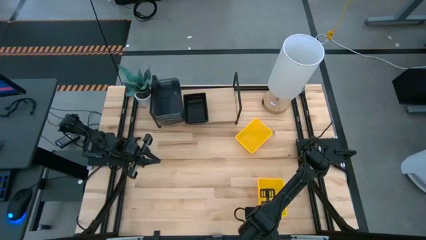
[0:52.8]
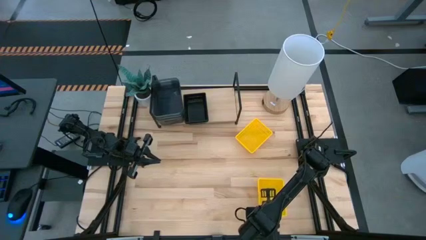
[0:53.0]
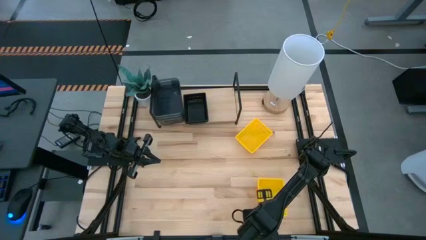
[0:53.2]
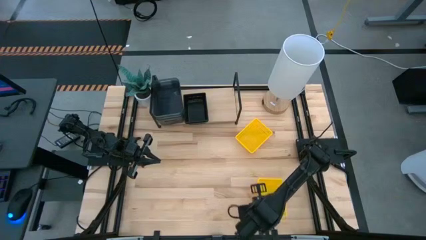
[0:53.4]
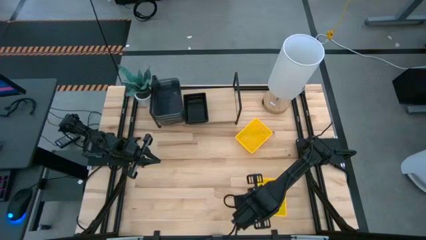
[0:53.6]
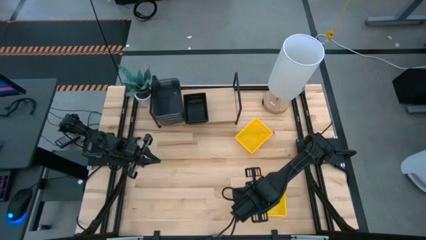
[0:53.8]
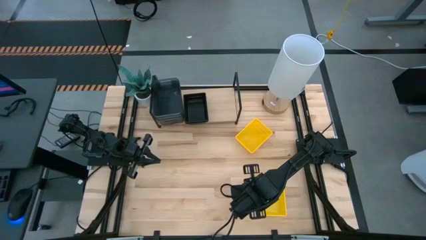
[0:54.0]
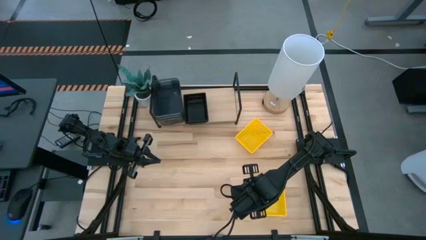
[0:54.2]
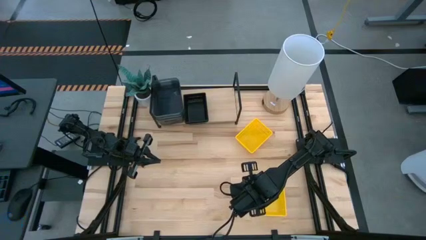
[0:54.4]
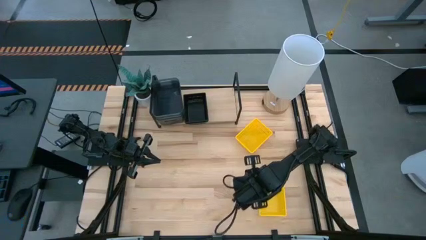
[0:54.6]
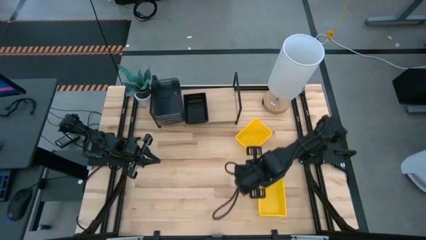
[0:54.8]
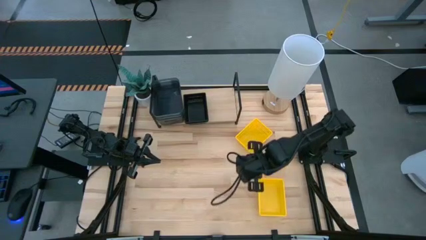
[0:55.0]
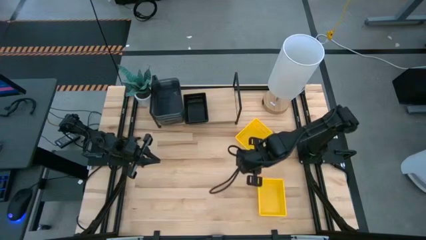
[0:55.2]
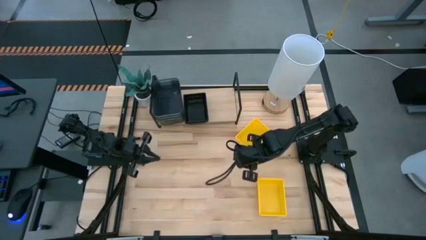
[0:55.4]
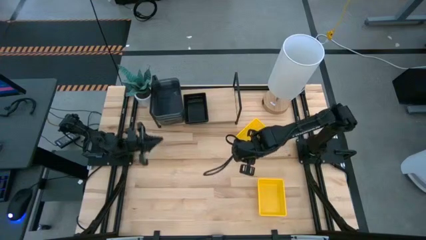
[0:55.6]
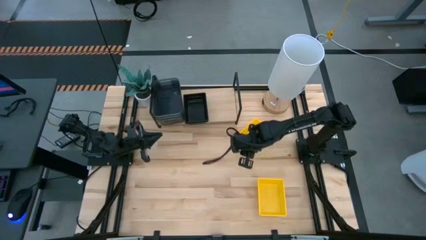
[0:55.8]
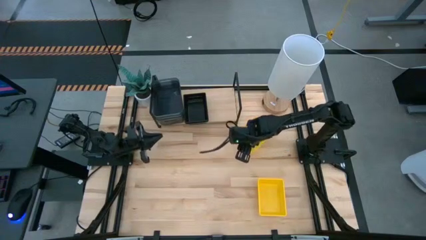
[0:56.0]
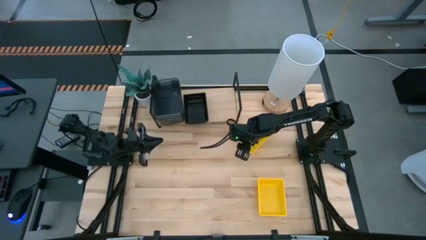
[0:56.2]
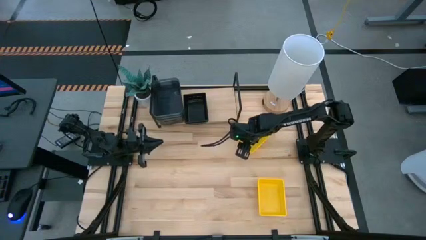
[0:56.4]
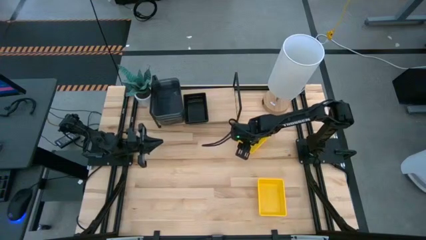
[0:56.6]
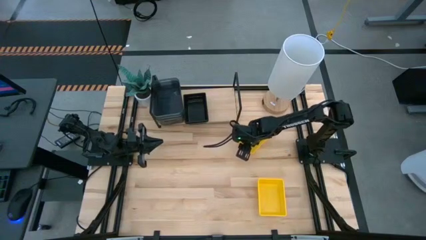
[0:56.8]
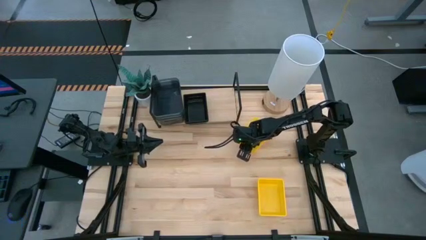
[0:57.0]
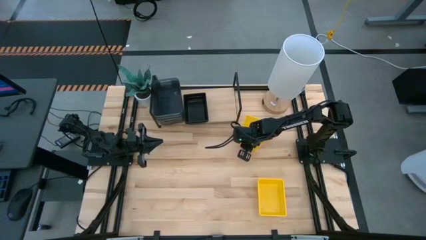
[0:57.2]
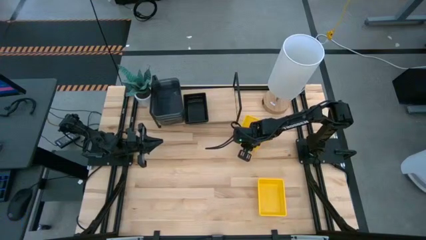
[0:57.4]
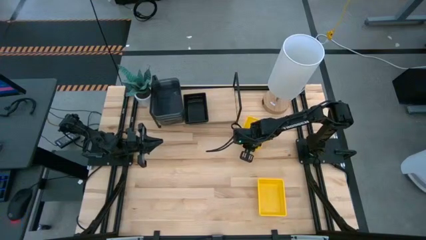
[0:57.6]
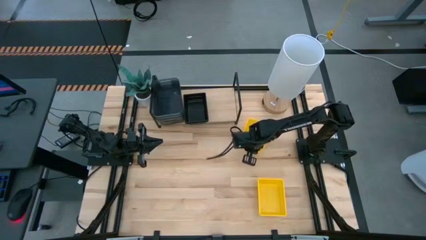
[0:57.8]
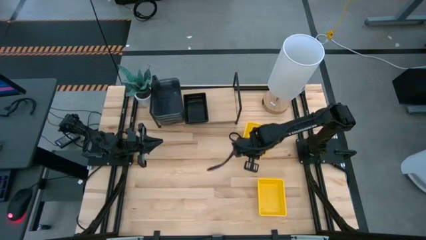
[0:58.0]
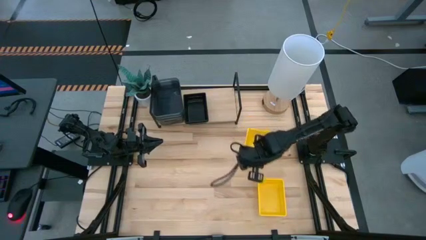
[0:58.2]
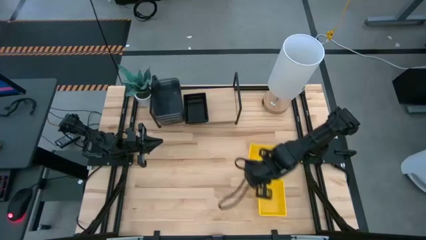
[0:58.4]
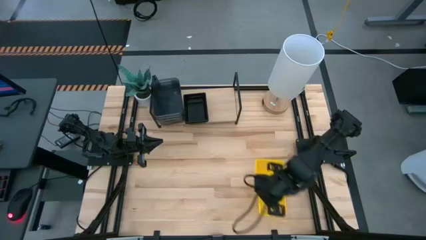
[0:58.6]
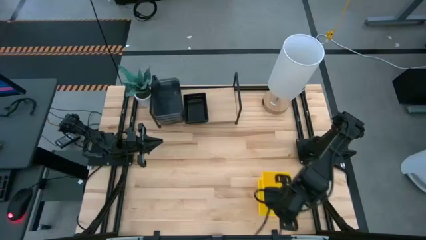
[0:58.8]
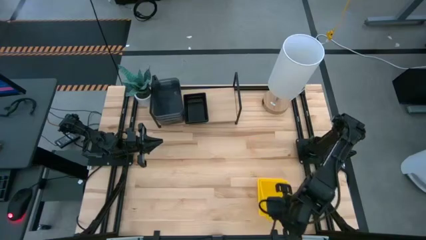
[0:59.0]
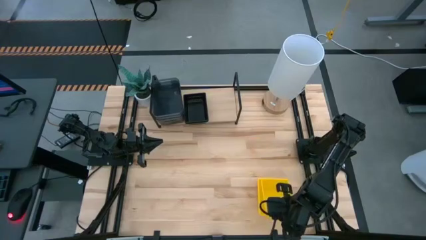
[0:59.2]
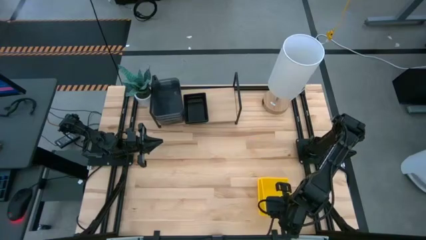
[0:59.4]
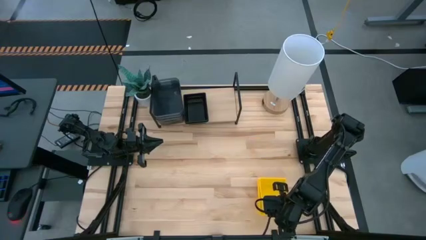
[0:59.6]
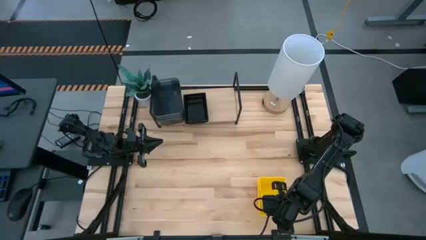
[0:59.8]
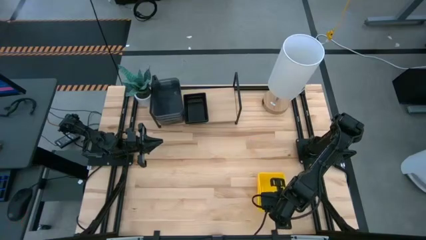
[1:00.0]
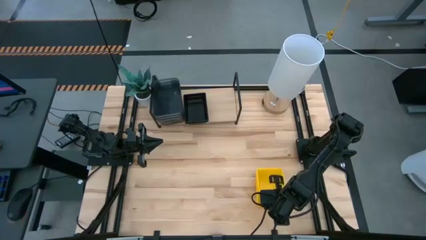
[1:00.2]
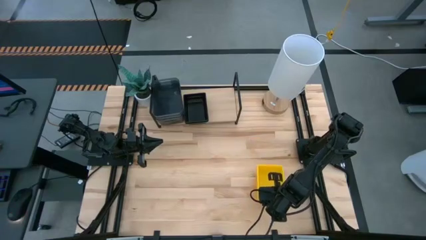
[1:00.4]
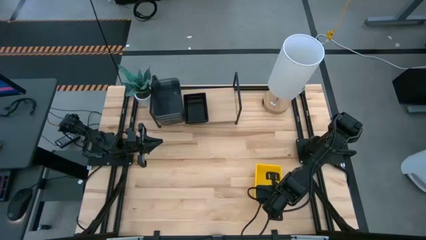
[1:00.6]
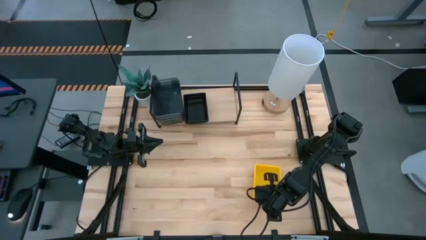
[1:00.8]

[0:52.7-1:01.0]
Task: Stack baskets on shelf by color
Stack the top yellow basket on top of the bottom yellow baskets

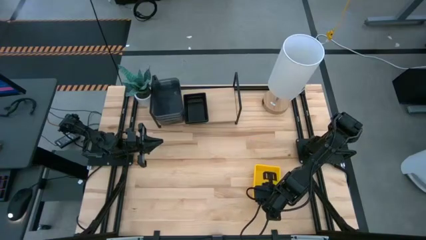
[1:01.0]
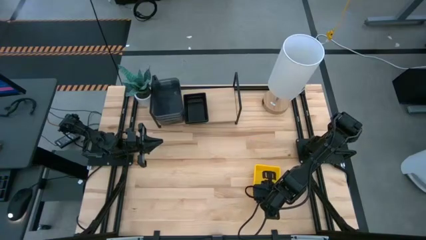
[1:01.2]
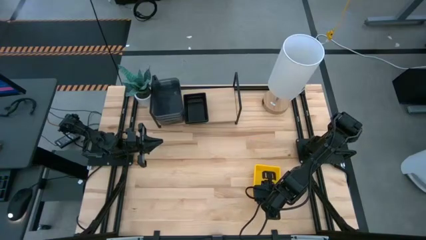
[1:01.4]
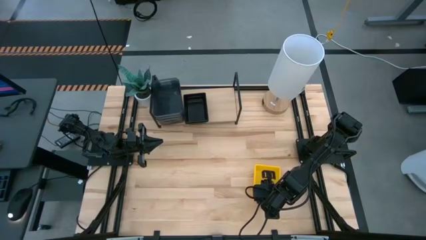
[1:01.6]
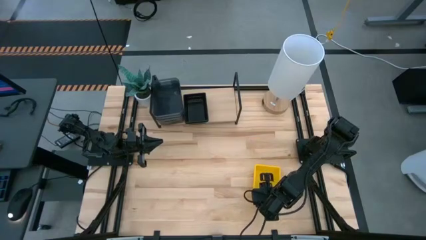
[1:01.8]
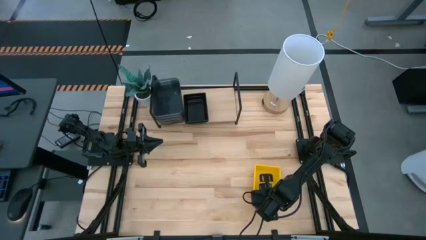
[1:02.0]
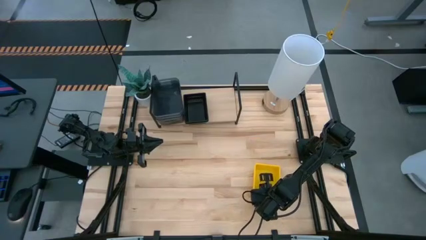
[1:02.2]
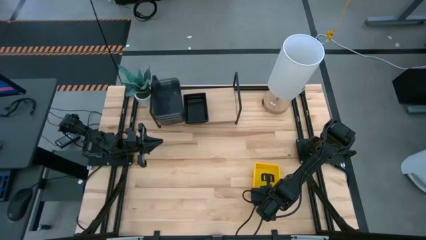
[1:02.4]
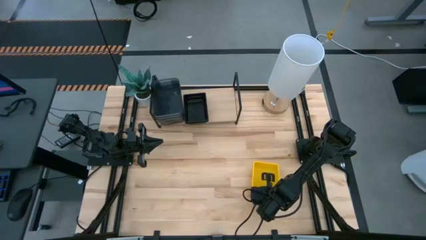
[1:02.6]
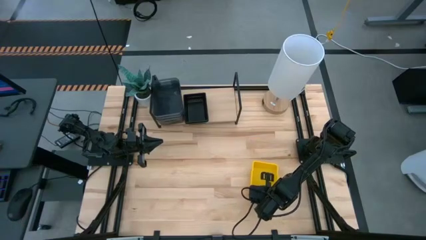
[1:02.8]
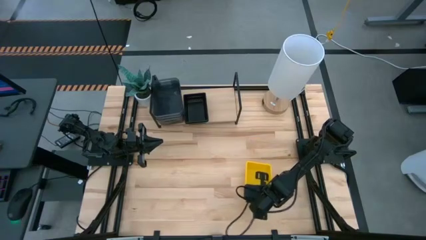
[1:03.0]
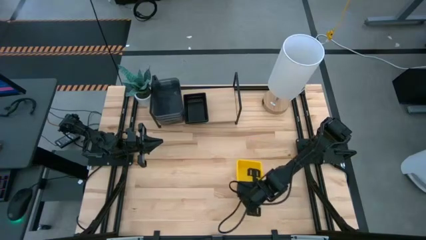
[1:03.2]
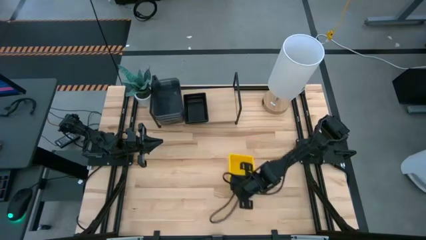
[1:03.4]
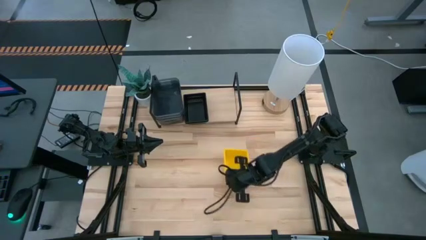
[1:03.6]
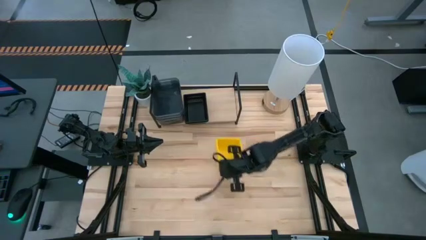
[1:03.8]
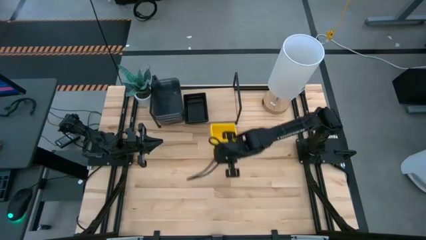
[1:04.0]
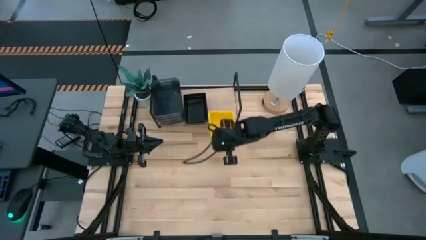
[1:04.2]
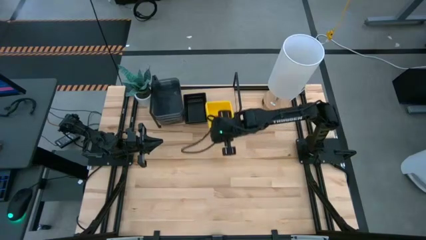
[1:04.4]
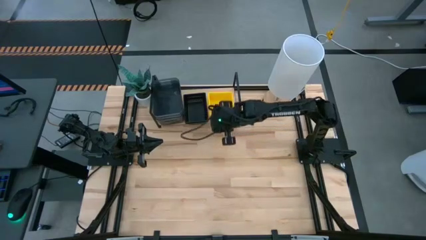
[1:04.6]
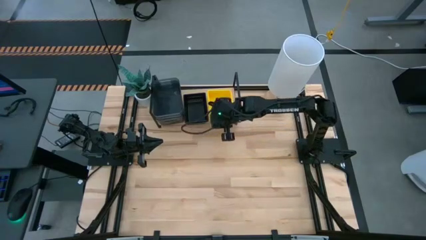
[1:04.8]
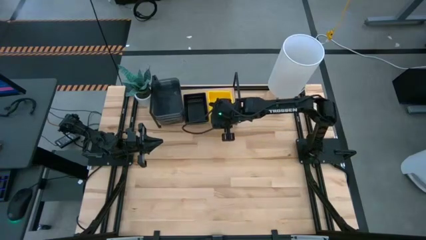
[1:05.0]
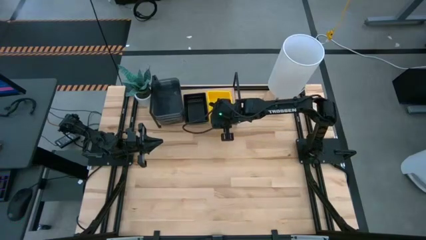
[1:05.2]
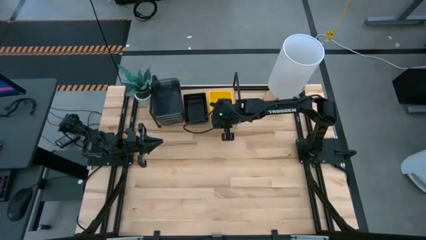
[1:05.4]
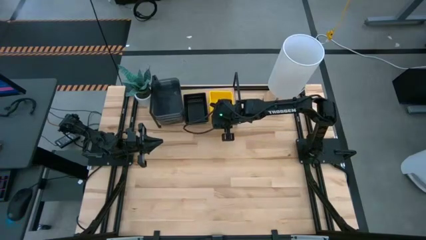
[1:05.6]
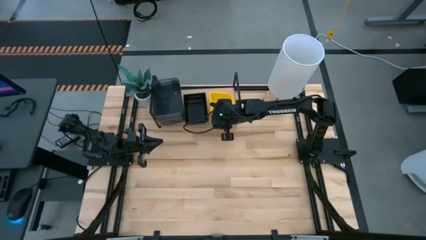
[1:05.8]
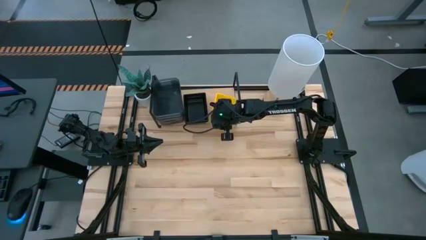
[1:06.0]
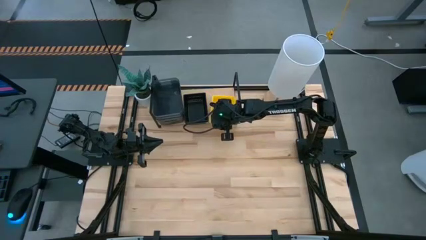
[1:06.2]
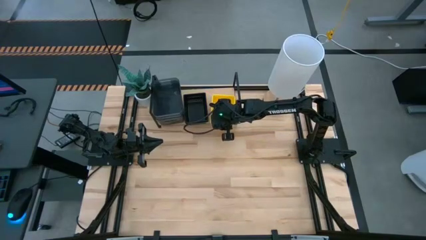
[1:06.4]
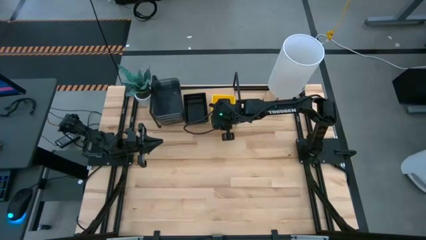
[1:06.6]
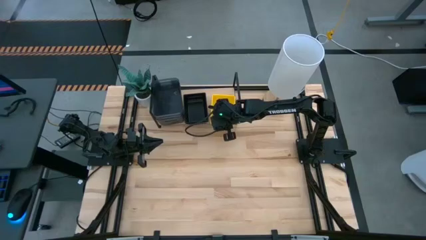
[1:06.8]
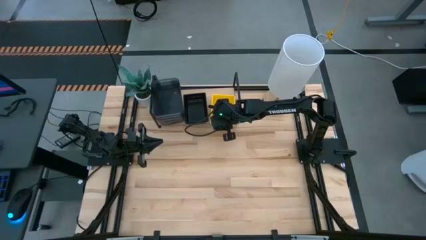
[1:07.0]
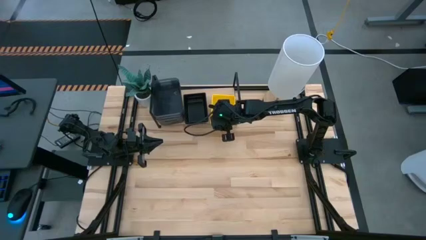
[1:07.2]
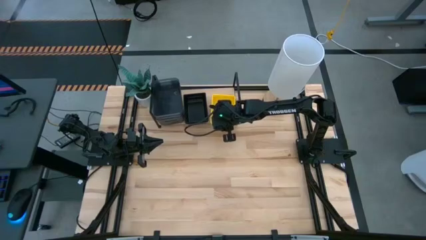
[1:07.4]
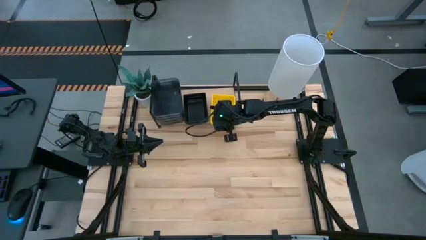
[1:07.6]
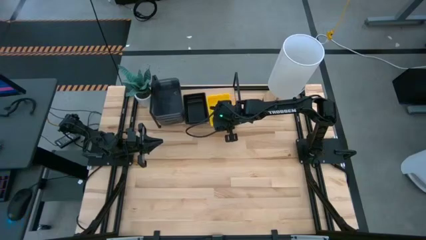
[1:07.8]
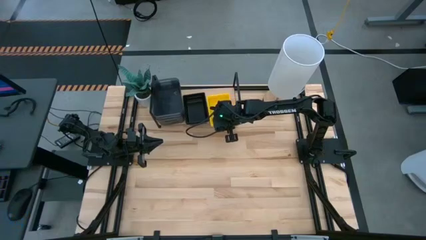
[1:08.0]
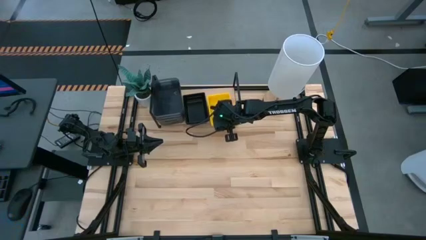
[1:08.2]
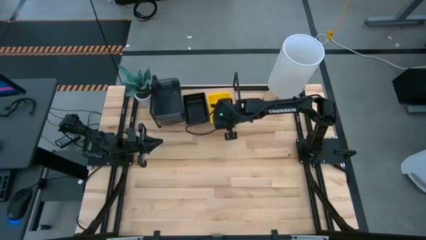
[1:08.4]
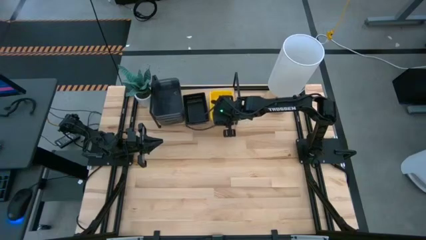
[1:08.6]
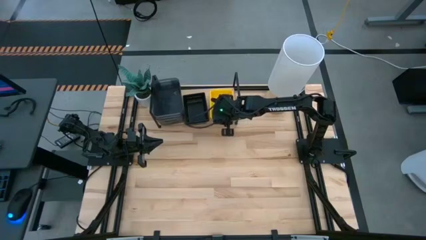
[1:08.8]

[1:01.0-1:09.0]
Put the yellow stacked baskets on the shelf
